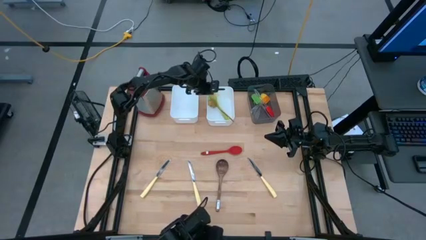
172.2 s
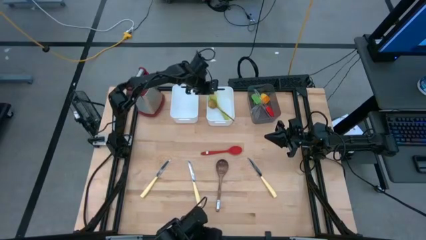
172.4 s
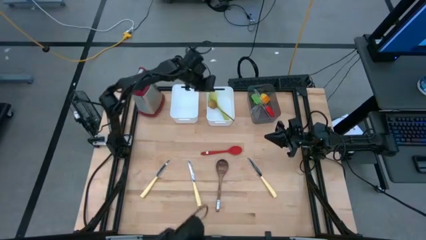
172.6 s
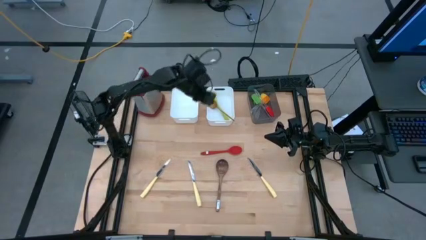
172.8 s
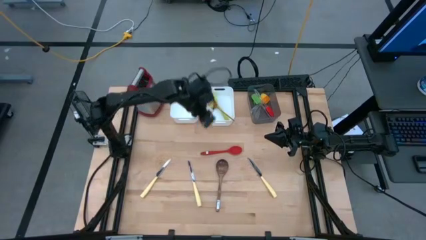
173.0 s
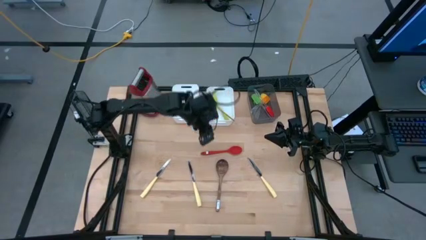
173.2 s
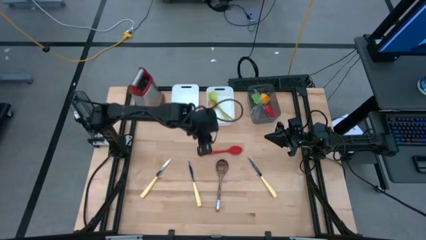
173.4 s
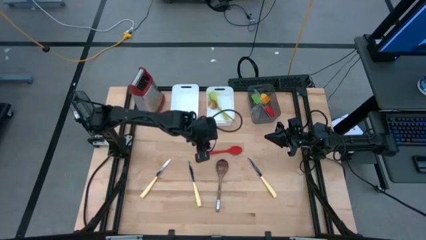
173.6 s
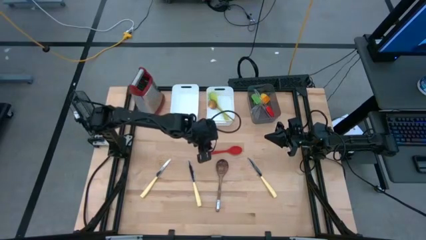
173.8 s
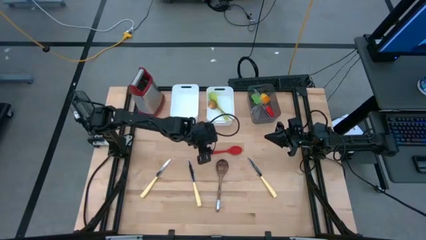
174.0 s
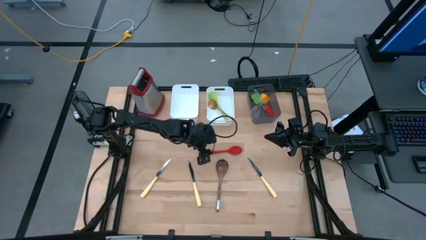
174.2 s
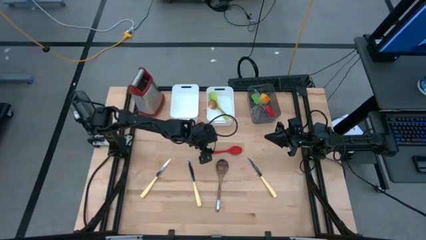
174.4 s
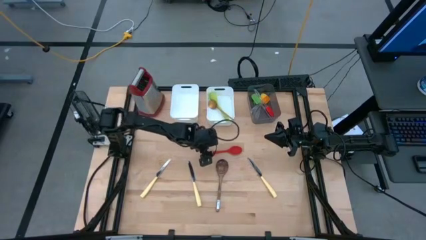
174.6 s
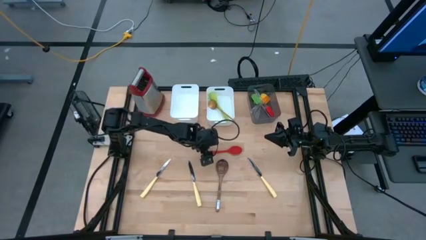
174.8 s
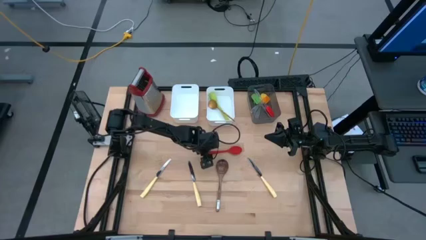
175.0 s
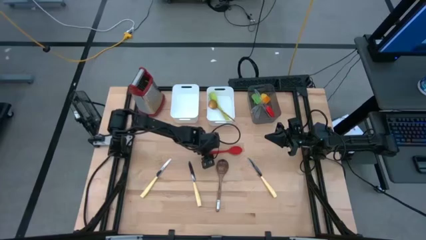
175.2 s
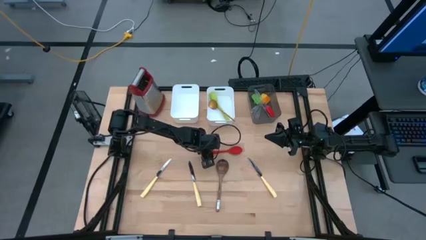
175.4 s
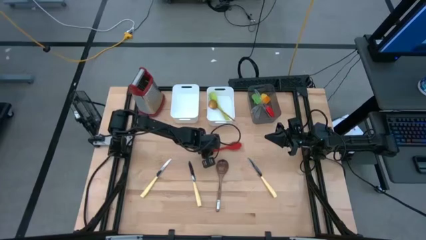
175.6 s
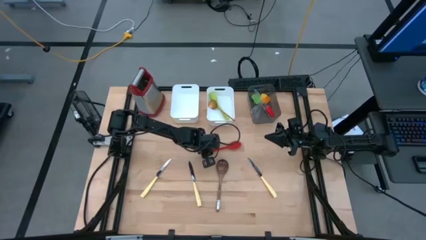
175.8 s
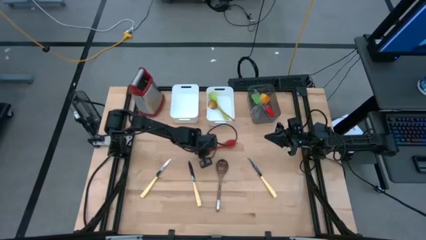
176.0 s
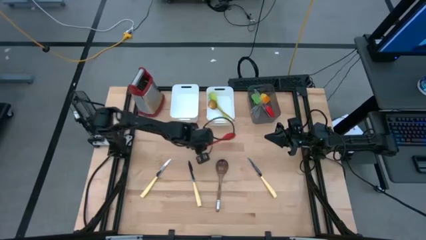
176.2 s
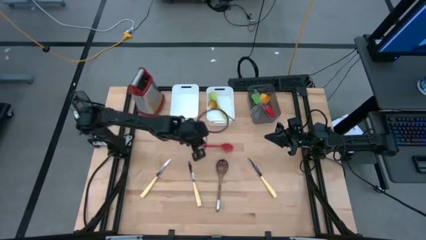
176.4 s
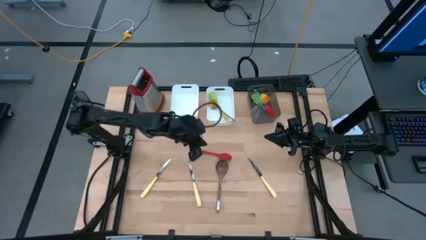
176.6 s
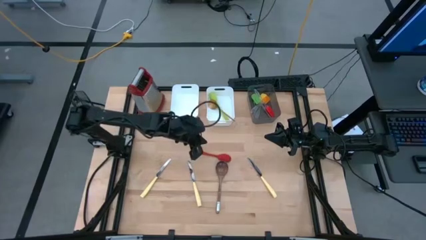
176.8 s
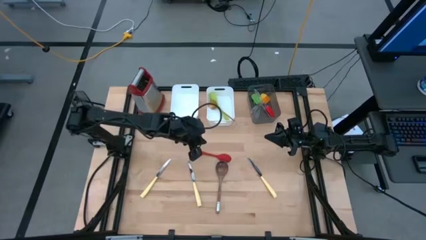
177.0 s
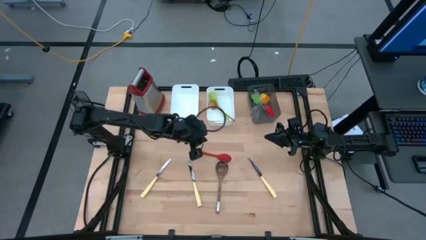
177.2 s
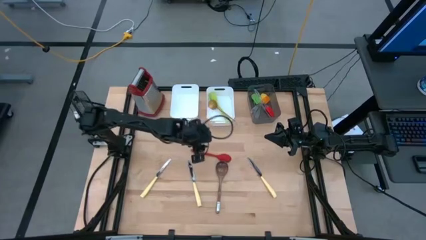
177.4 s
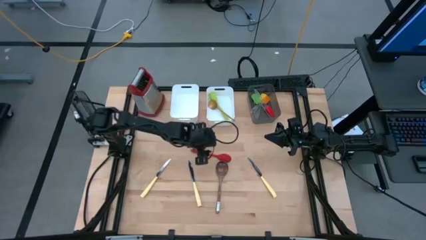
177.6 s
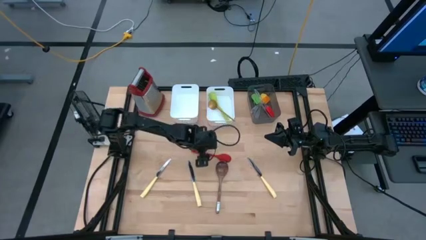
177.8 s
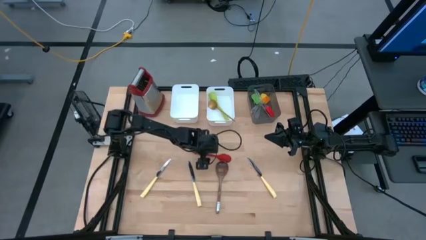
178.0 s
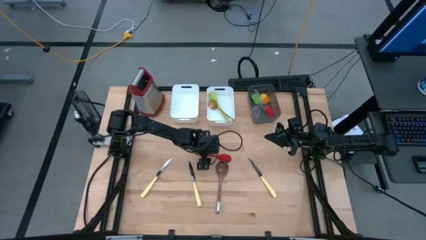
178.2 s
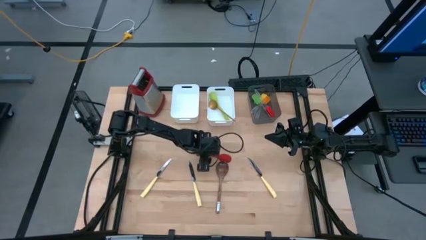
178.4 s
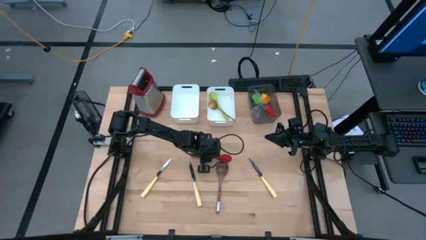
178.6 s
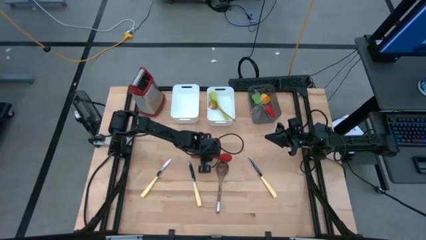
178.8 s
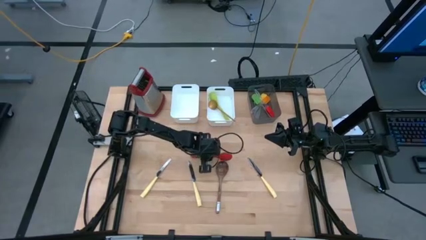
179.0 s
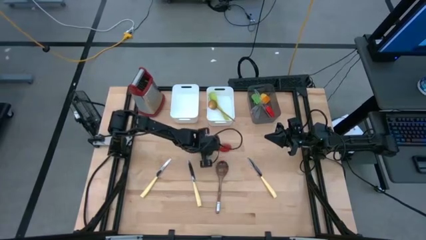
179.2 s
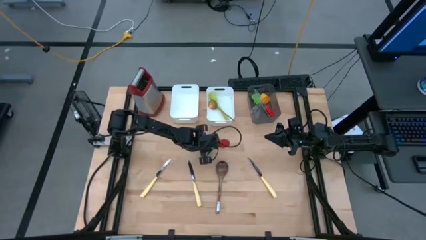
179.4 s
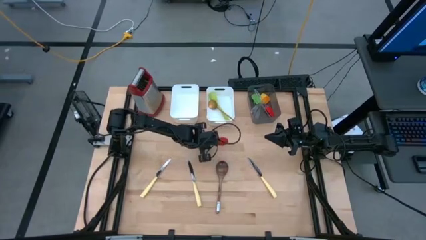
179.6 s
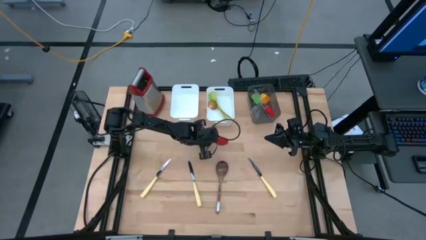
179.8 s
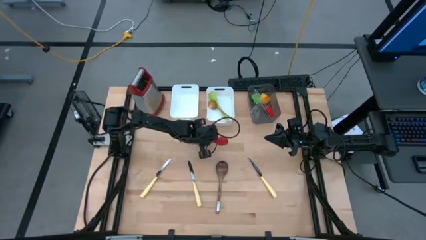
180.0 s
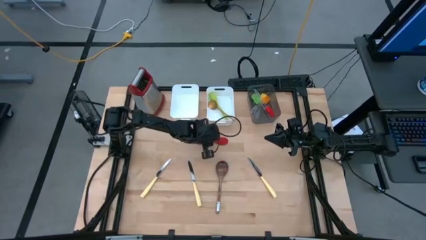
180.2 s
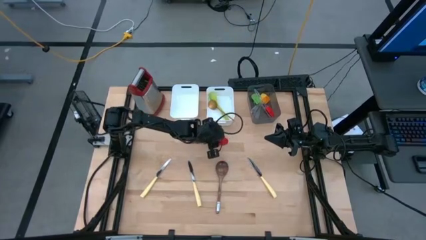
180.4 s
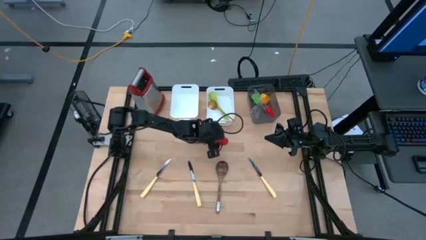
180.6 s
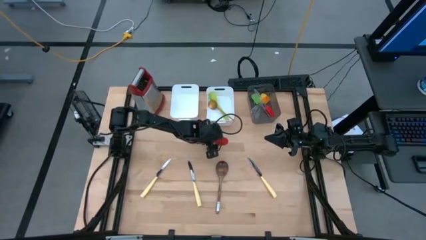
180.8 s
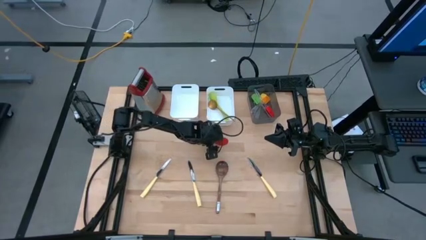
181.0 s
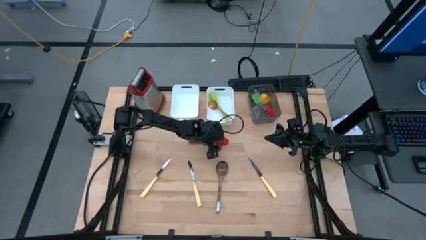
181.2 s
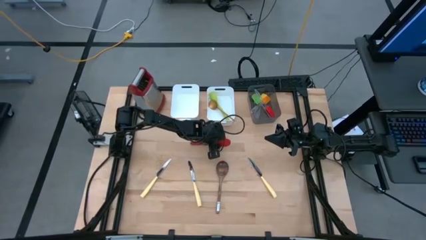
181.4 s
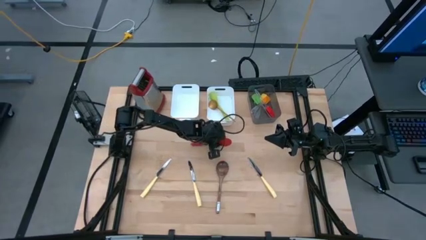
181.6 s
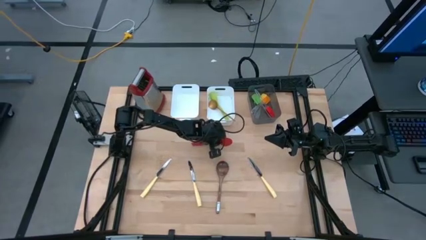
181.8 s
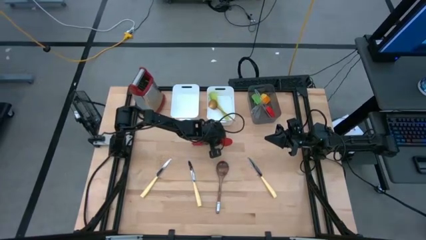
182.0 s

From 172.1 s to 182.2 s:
Task: Pick & Place Kitchen Items
Put the red serving spoon into the right white bin

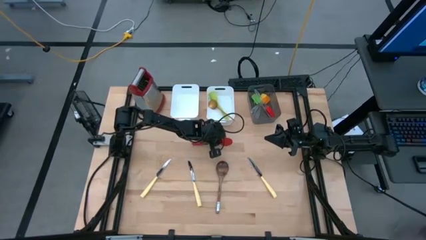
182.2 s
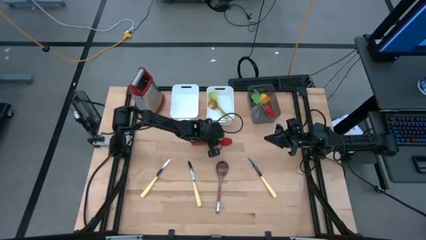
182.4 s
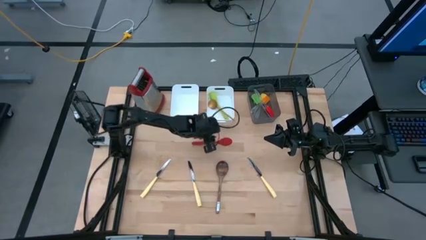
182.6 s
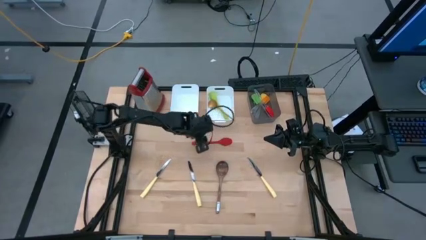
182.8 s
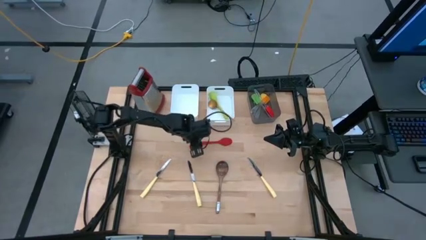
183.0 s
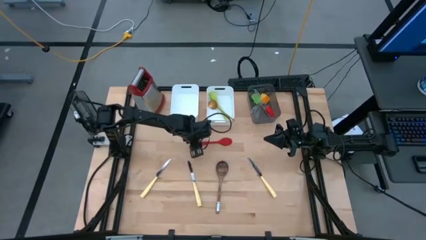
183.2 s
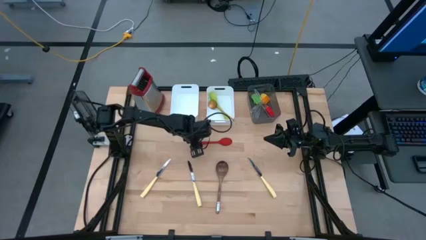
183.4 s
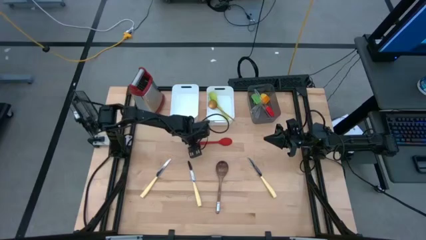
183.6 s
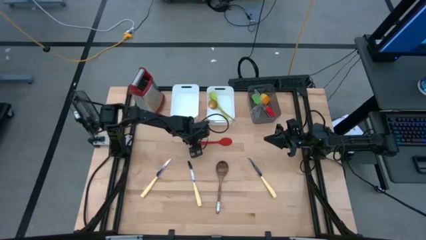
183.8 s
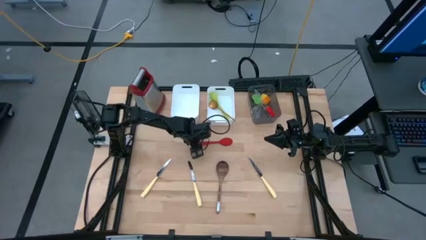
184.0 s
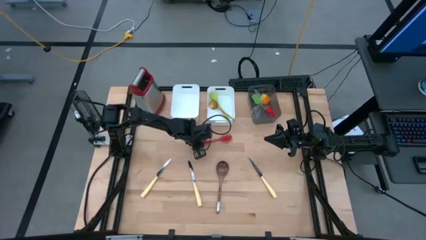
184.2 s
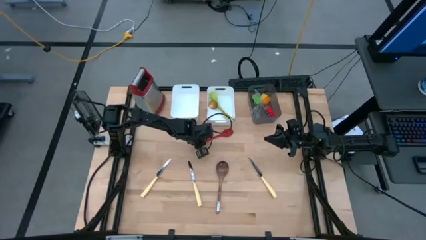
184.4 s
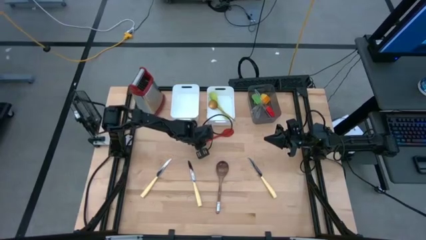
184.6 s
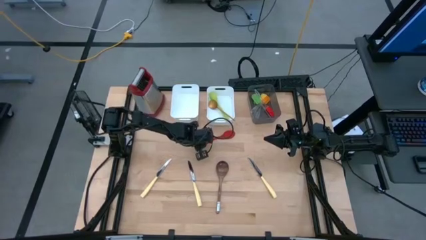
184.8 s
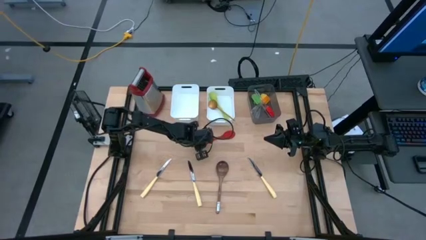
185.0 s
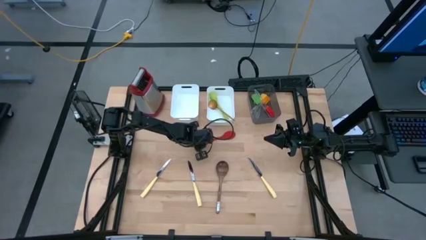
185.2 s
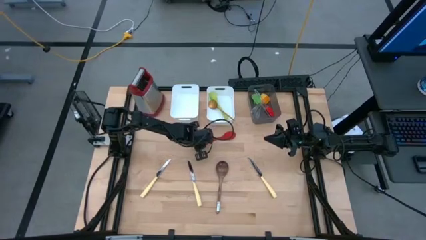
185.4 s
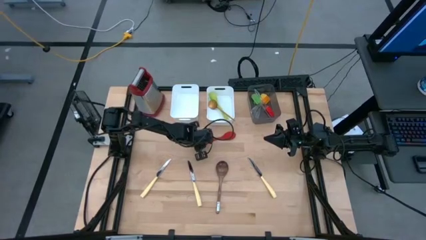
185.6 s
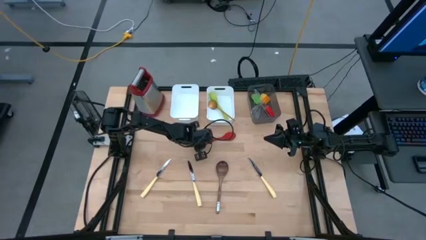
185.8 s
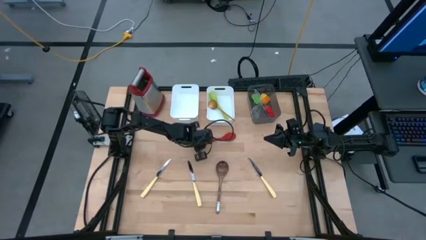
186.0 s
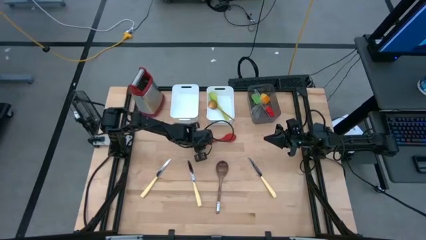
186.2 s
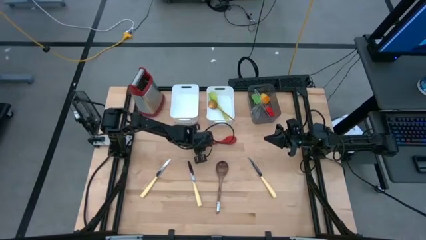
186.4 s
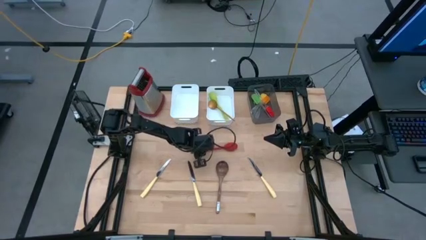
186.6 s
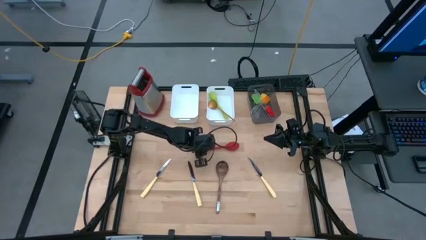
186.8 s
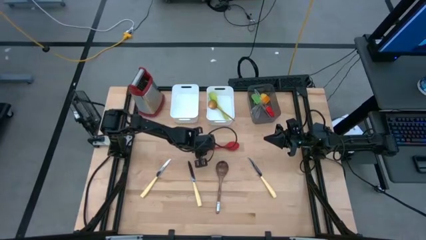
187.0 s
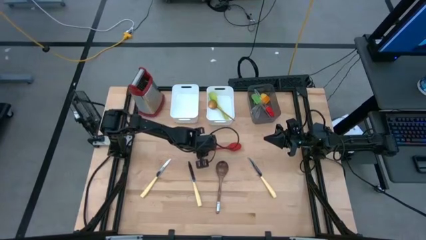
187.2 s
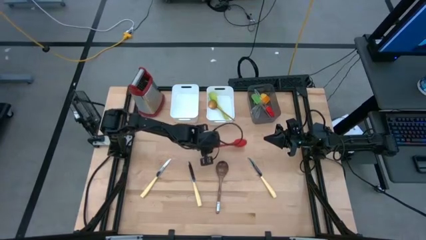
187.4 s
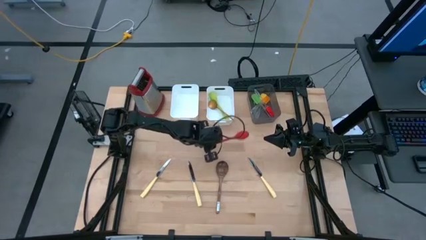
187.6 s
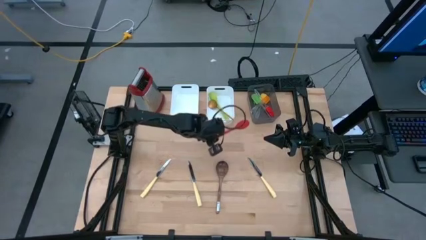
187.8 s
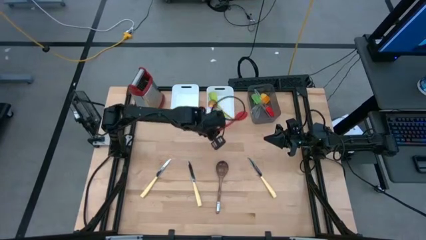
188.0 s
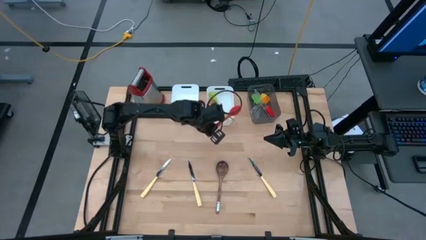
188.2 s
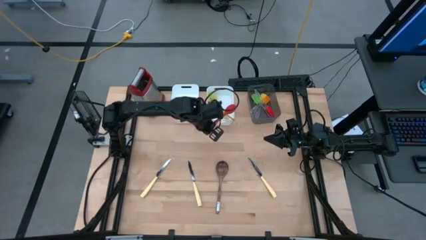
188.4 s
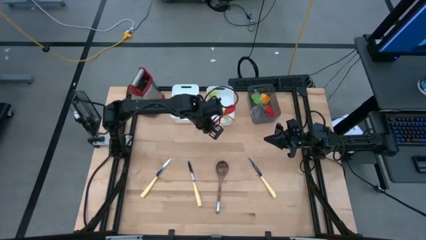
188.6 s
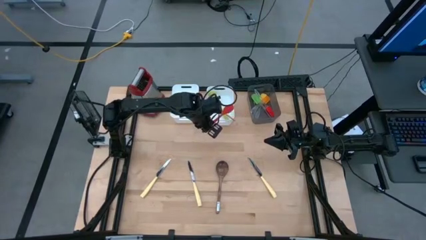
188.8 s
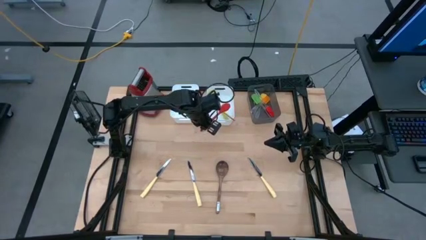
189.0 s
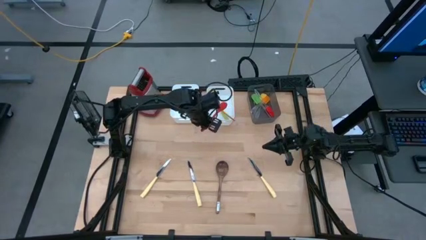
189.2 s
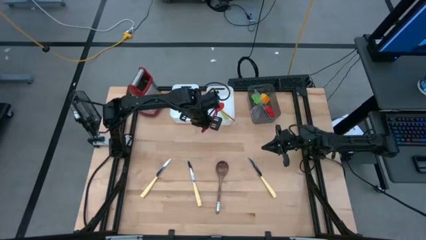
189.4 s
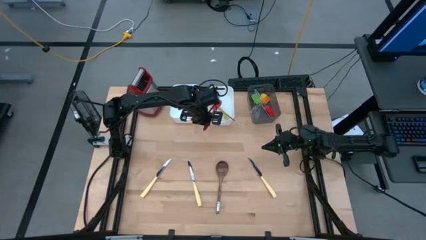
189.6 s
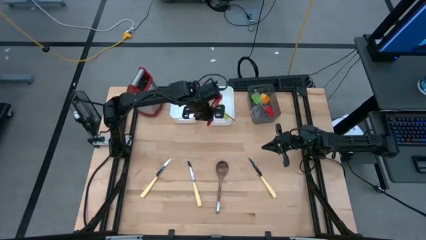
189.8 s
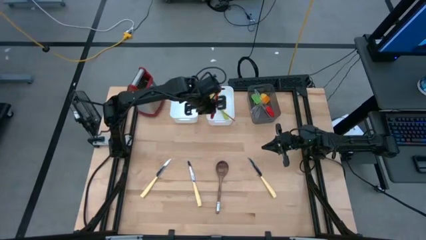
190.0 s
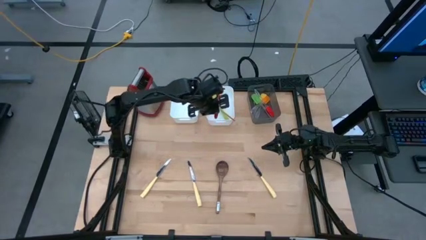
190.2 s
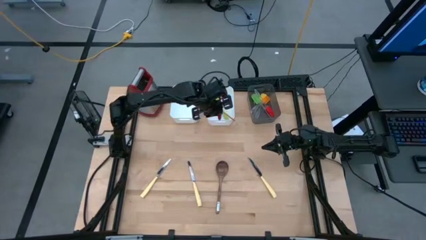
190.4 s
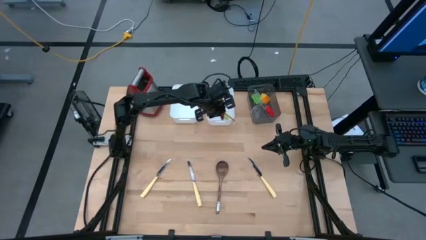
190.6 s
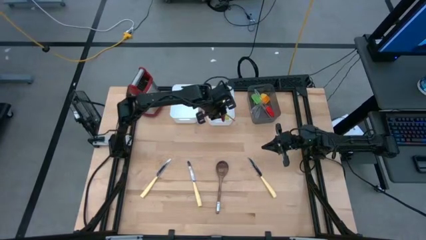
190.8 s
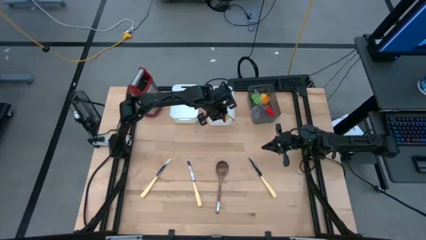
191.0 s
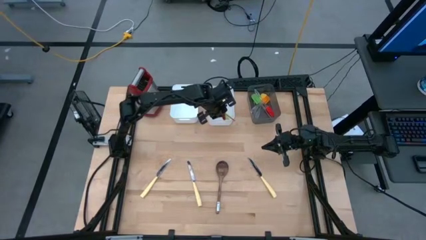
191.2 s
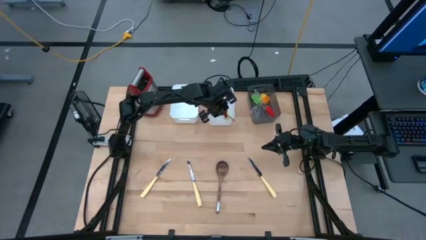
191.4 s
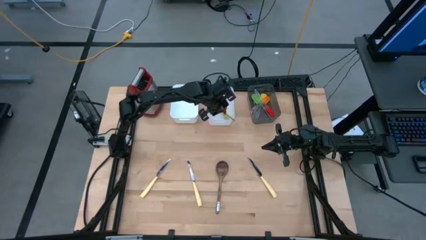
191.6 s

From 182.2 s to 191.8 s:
Put the red serving spoon into the right white bin
